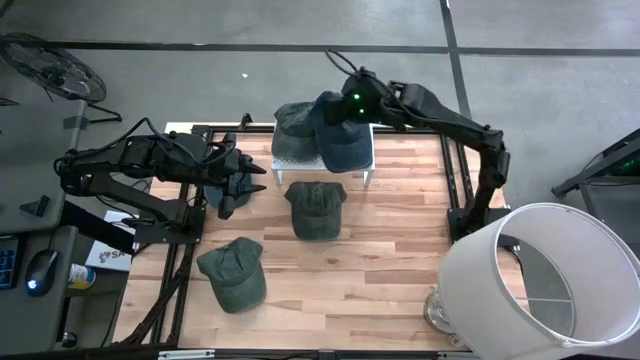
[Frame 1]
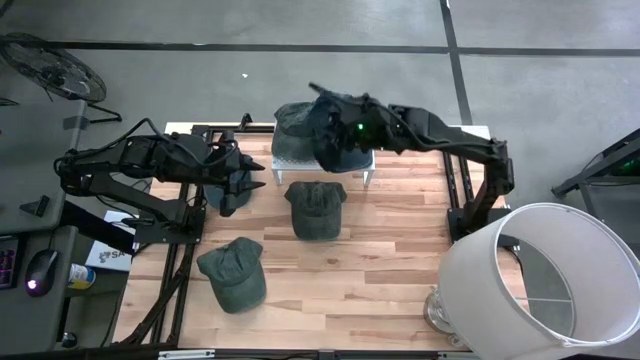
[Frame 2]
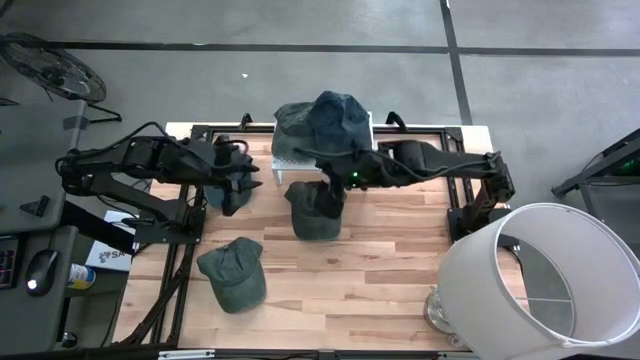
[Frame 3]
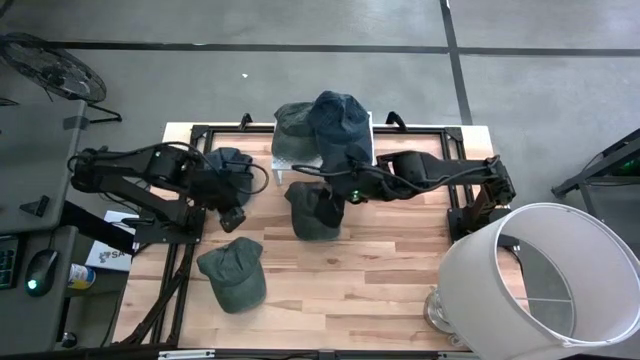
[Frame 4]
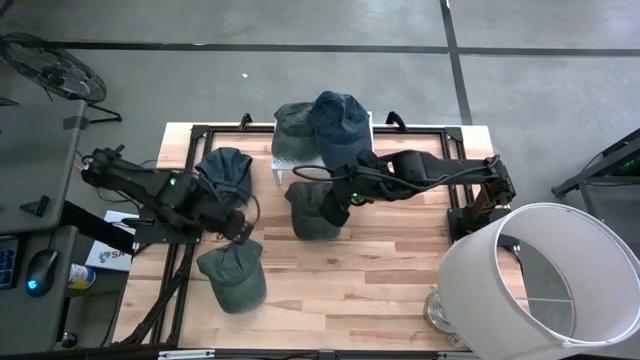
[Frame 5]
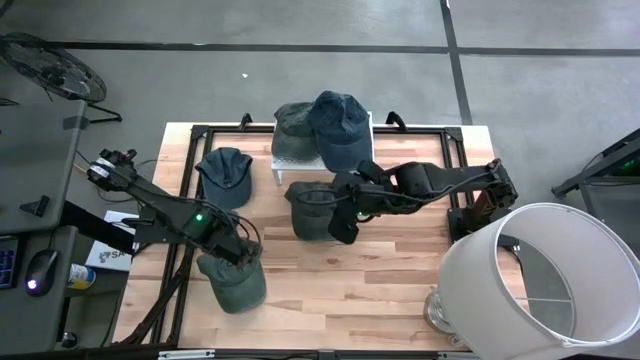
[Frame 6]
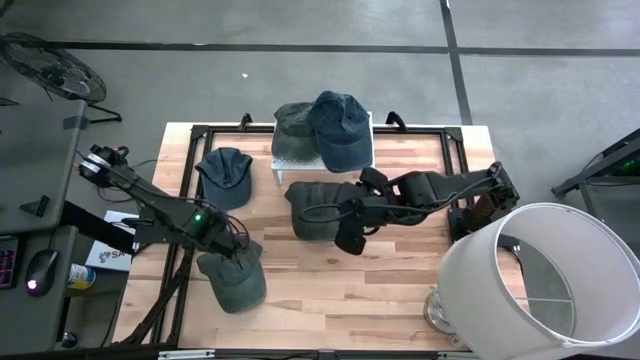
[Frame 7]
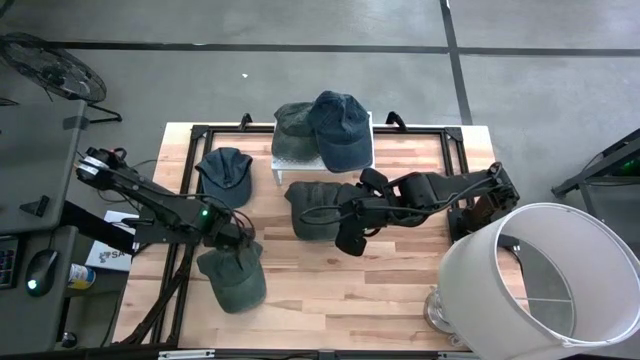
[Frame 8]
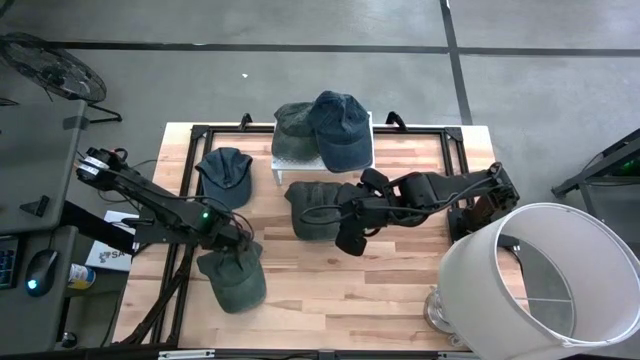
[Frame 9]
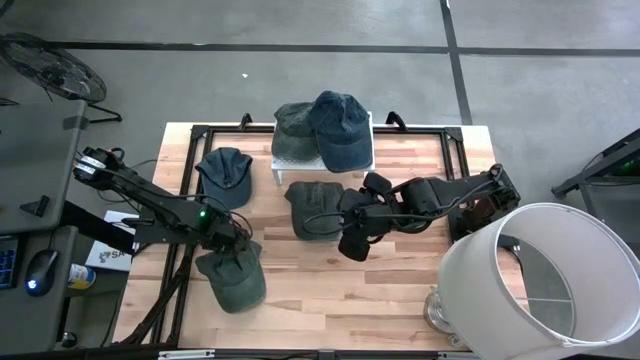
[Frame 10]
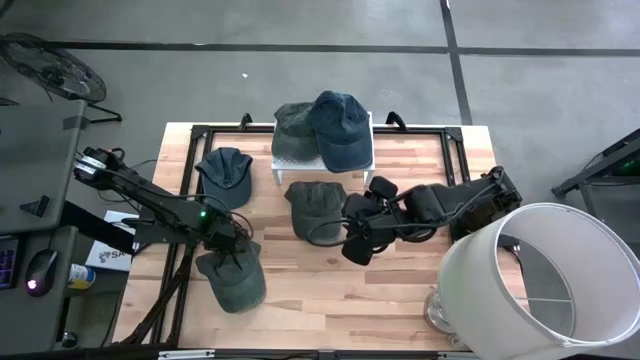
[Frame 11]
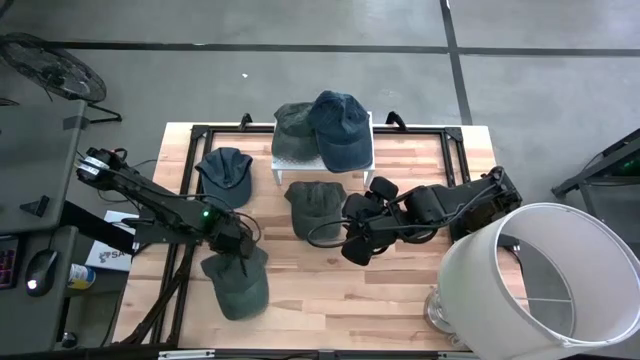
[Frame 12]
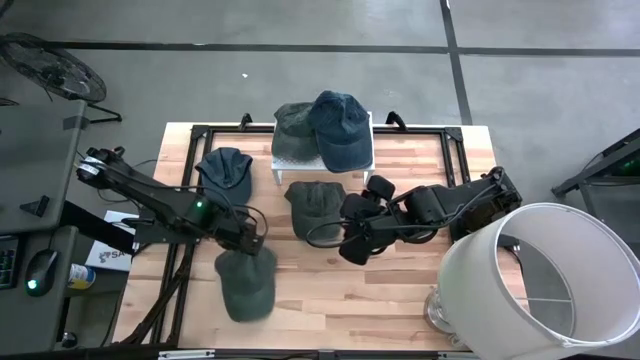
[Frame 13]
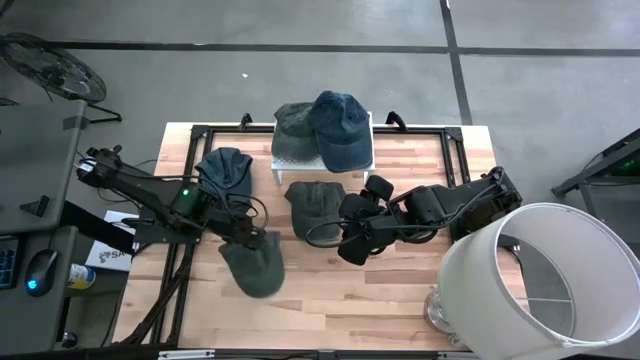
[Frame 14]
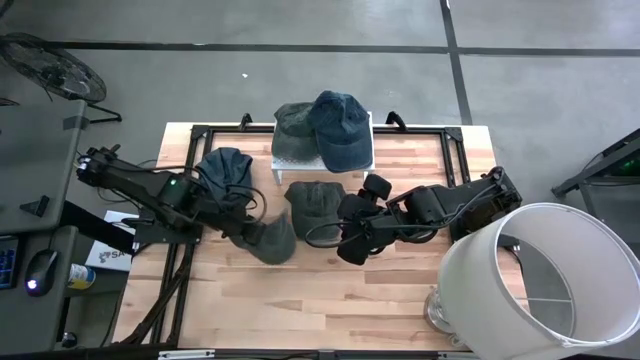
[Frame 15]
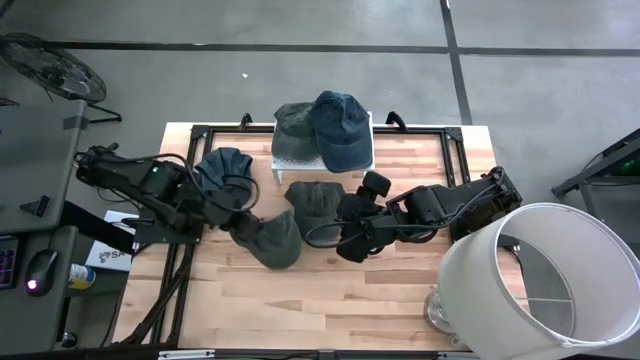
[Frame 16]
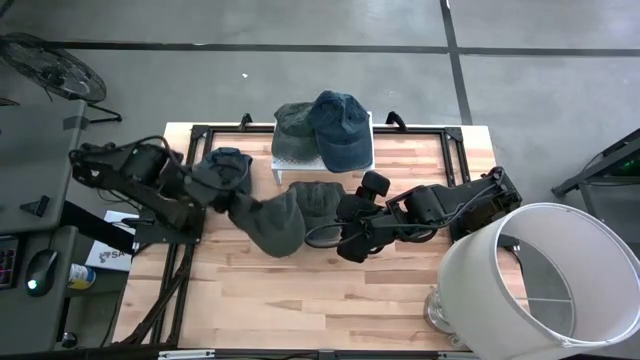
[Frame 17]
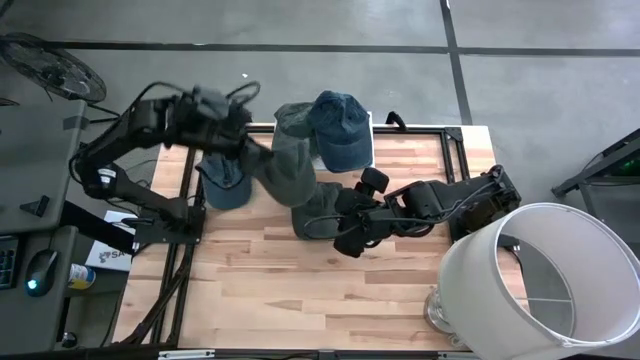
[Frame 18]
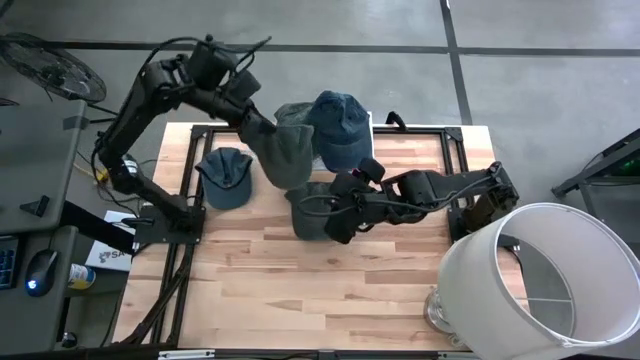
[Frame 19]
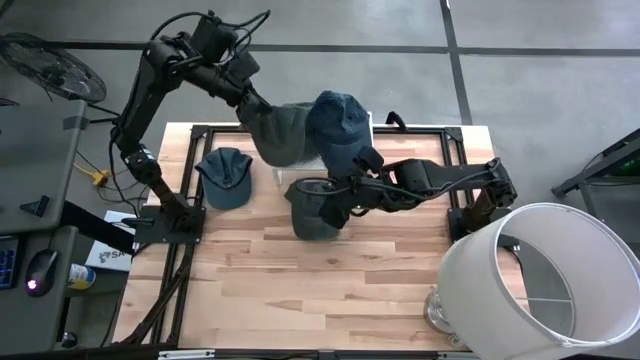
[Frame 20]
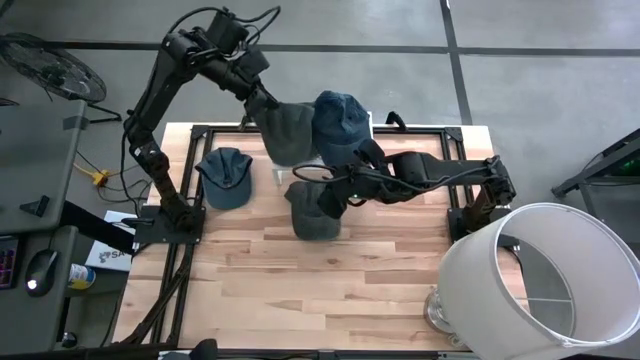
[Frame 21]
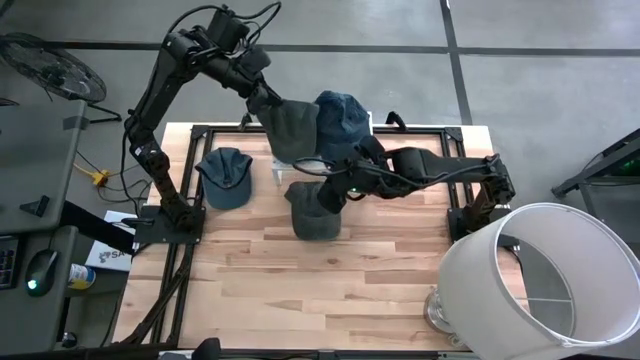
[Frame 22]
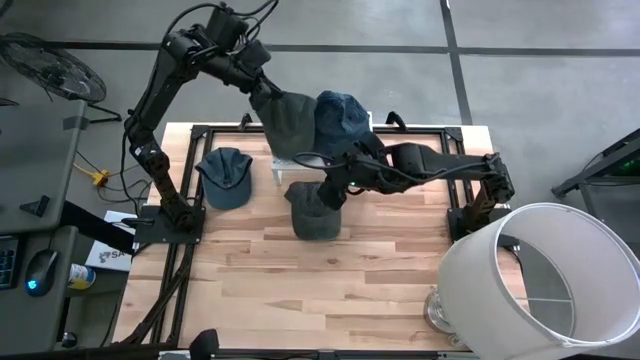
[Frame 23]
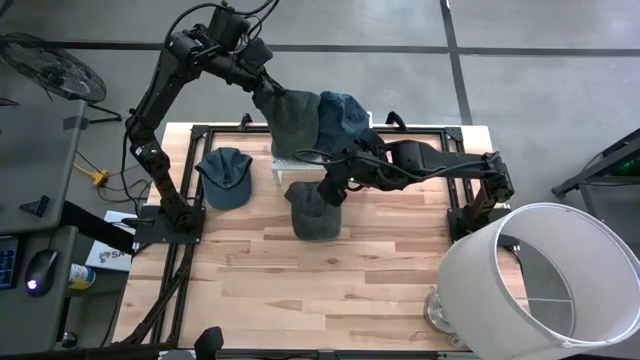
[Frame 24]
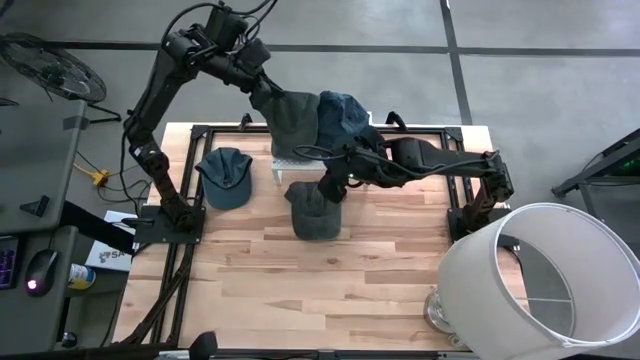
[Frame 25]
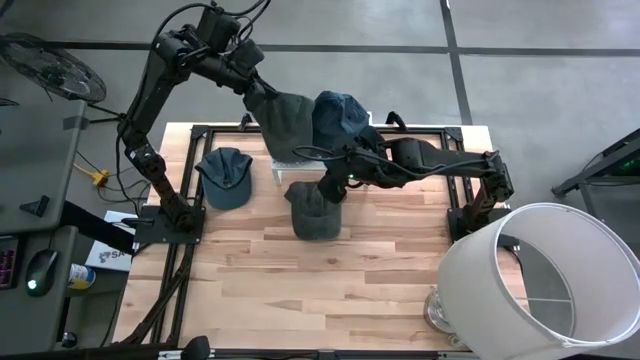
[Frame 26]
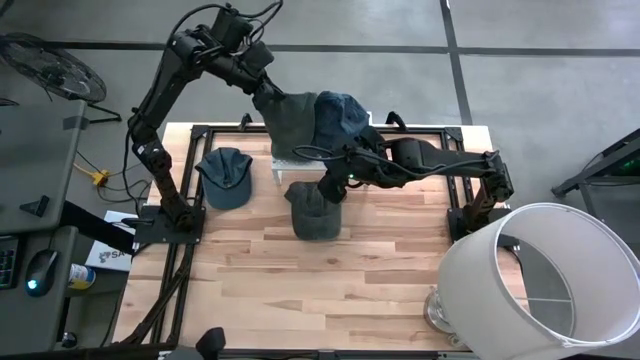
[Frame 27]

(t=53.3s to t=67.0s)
Task: Pick & Place hat
Put the bottom gray cap on the shelf
